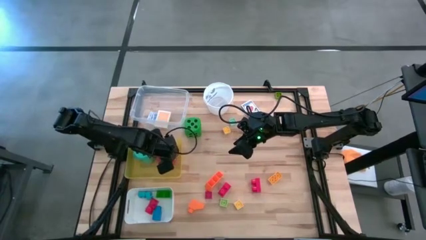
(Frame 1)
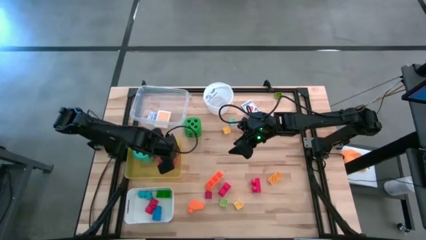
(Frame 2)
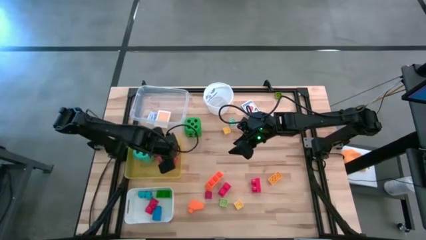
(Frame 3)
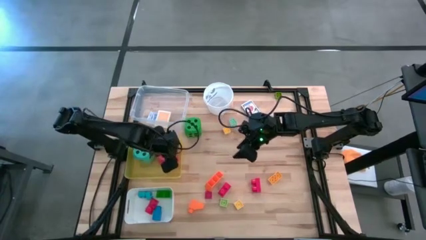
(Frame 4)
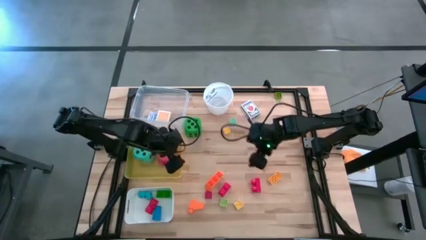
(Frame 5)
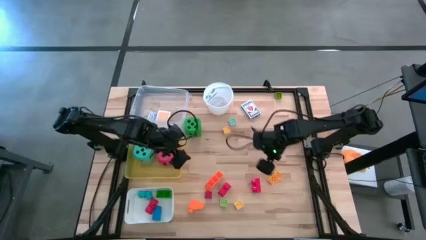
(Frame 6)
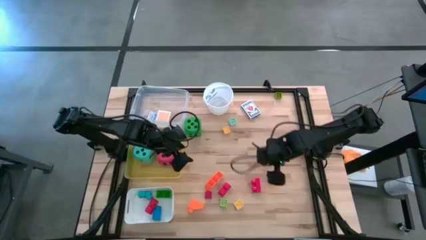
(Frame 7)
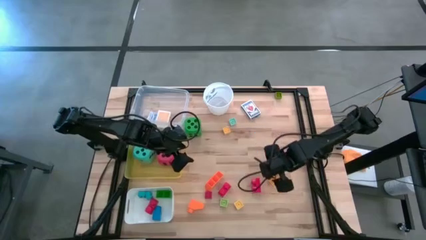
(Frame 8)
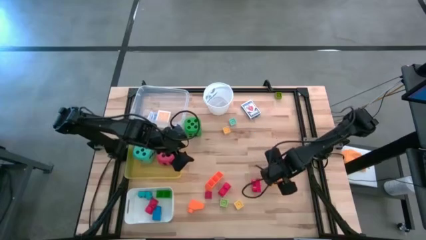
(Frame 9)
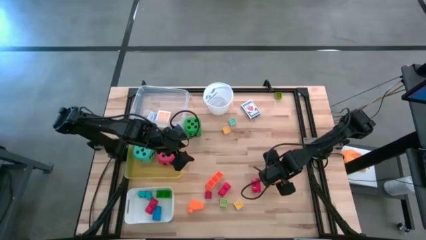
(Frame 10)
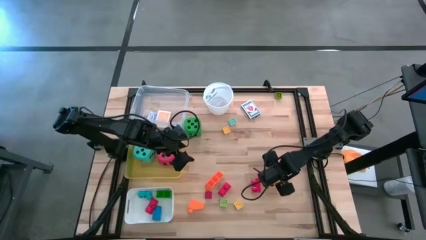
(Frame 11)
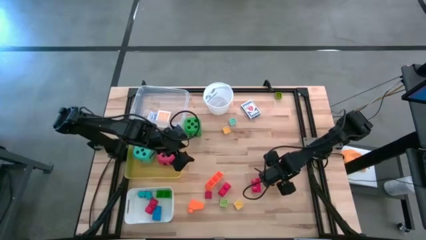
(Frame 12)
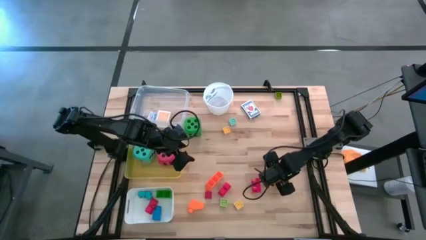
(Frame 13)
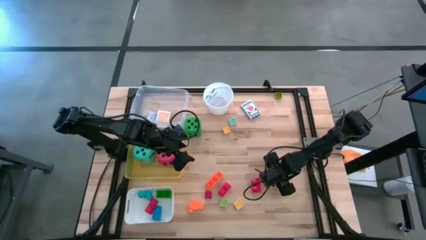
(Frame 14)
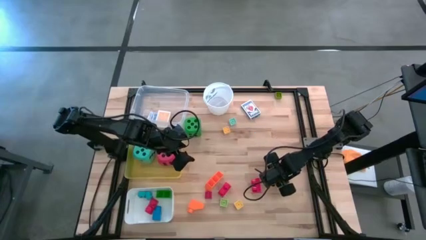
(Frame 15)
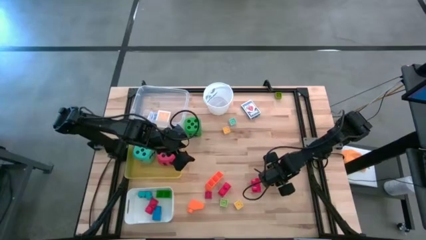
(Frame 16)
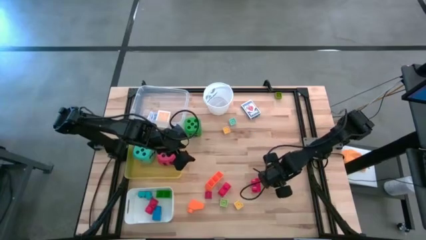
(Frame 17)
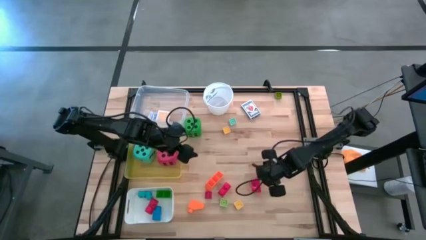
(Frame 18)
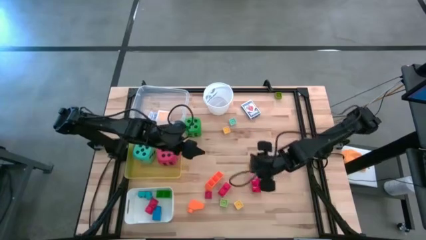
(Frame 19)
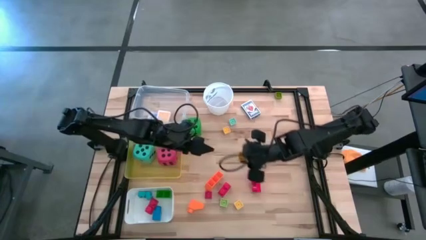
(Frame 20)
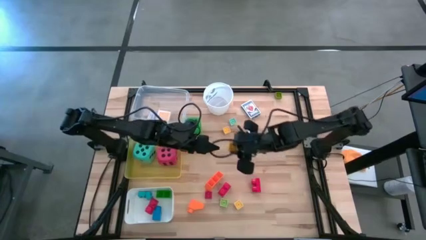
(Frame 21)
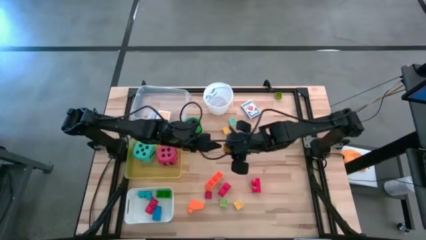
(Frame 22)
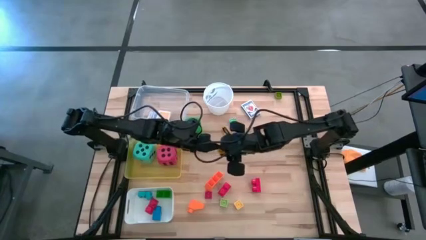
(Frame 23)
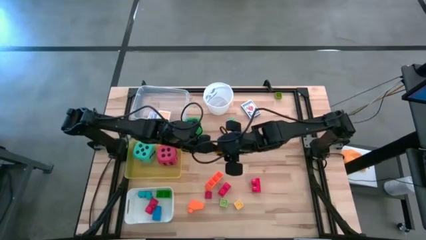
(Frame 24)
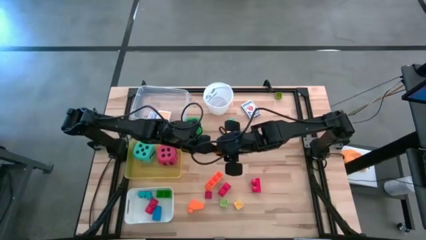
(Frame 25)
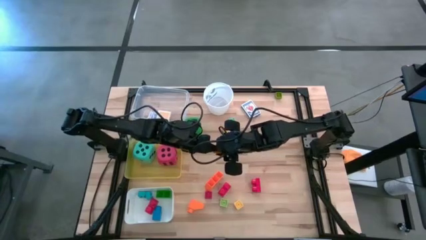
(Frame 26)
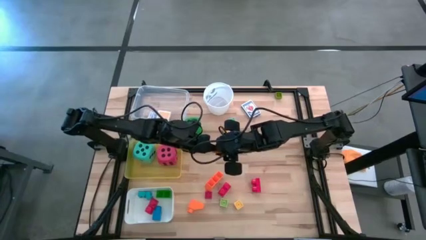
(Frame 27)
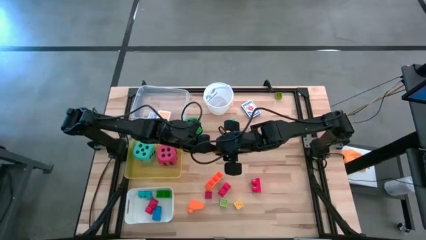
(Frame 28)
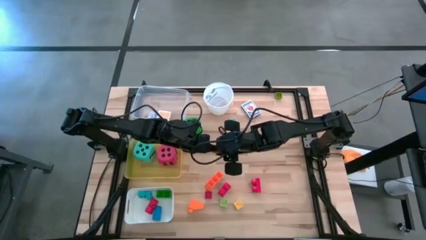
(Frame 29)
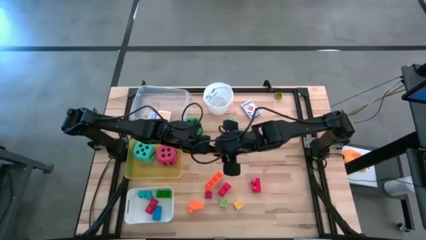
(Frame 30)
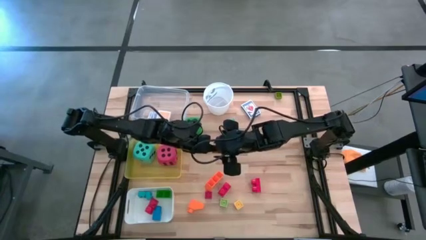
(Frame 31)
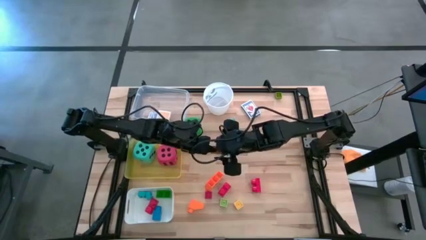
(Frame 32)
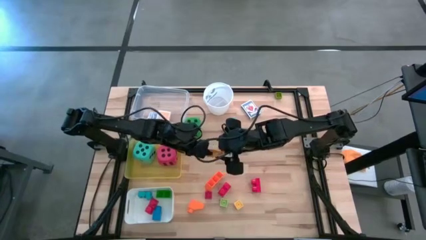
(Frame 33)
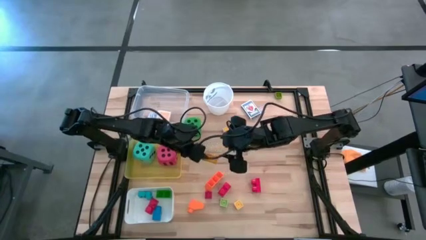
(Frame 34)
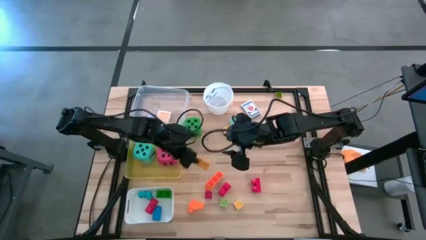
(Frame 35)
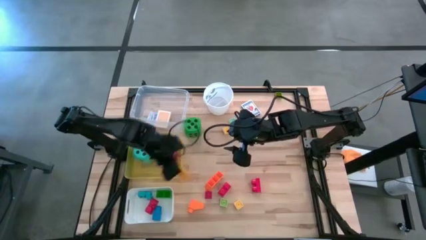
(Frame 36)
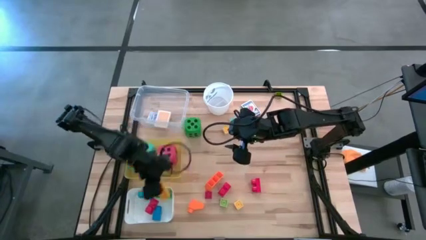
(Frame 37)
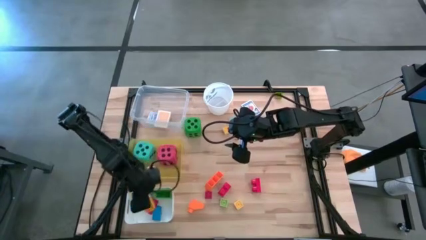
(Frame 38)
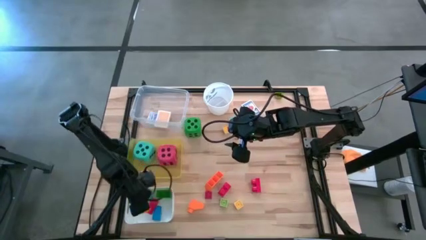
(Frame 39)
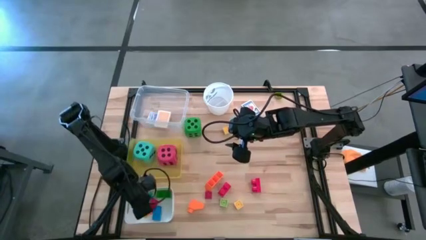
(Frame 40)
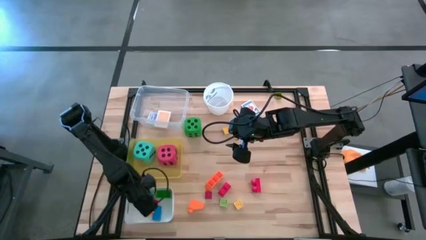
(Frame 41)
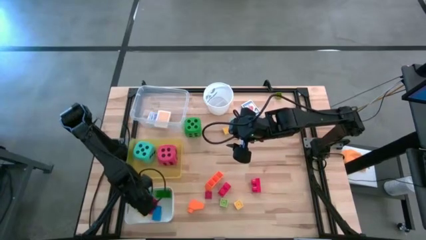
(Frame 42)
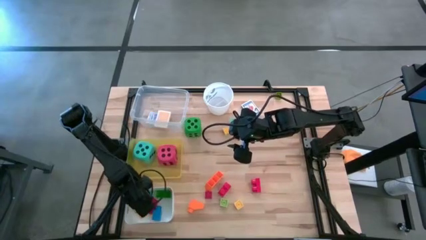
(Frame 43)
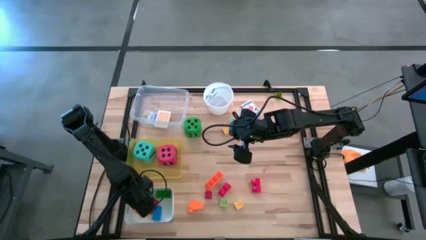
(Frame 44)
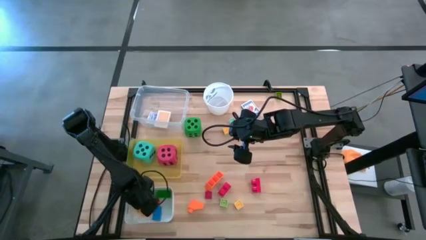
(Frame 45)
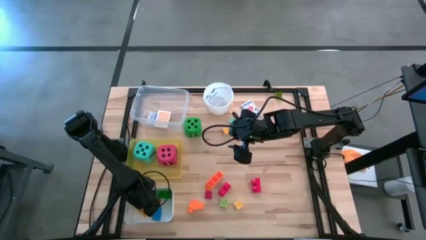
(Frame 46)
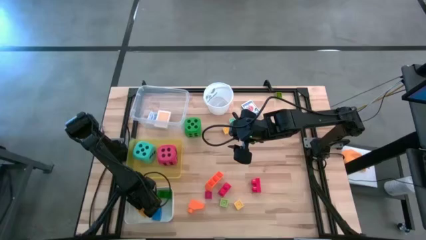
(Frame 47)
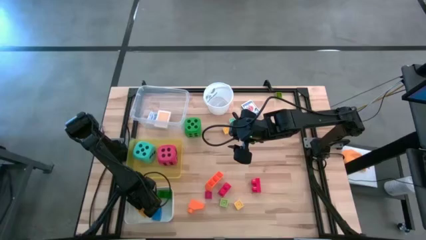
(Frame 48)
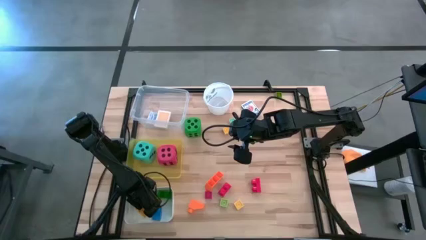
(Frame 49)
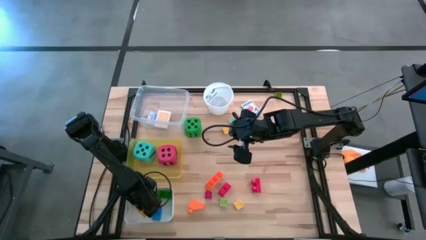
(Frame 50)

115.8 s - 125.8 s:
Task: Pick & Place Toys
Put the light orange game piece into the white bin

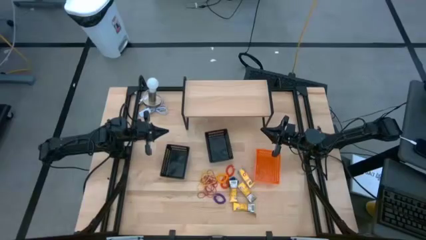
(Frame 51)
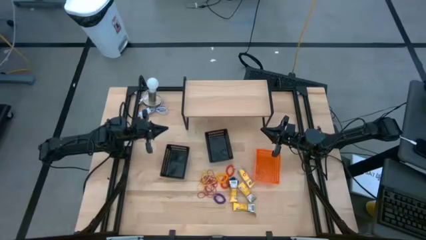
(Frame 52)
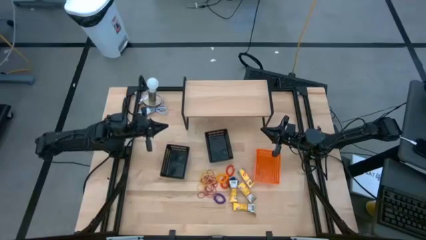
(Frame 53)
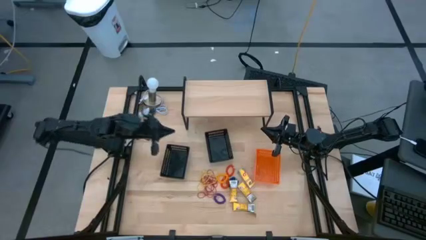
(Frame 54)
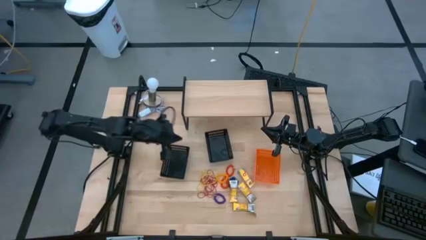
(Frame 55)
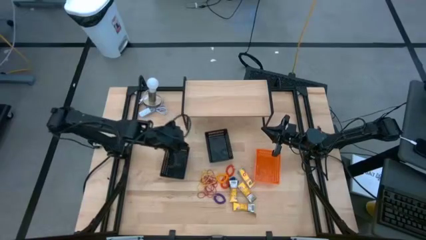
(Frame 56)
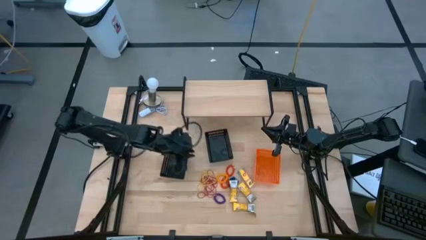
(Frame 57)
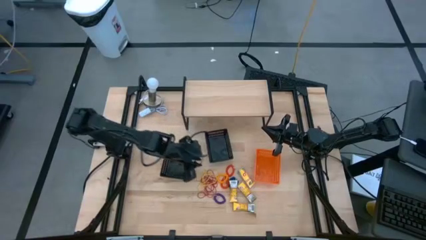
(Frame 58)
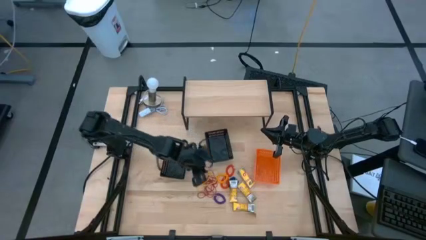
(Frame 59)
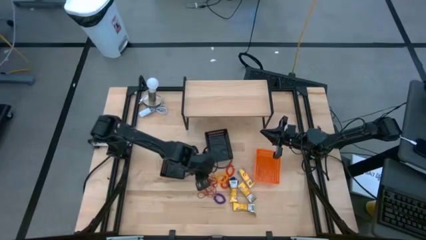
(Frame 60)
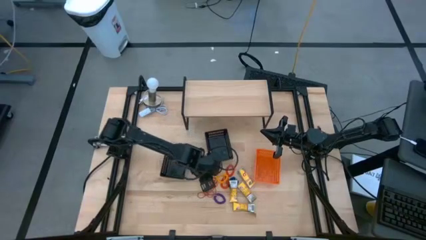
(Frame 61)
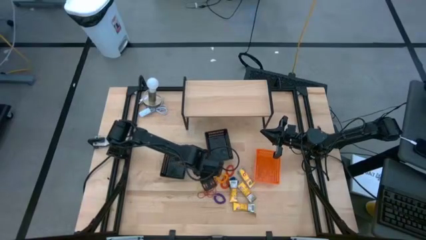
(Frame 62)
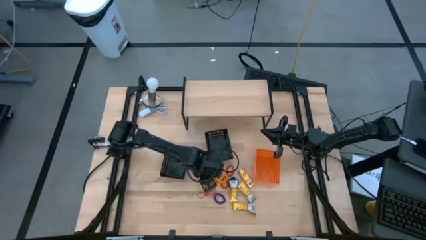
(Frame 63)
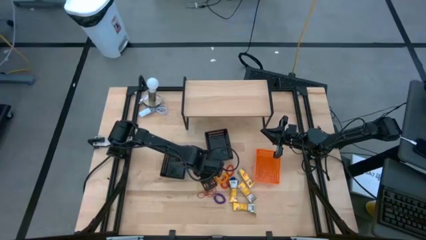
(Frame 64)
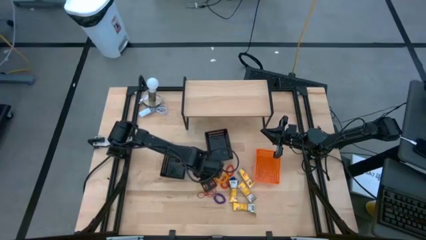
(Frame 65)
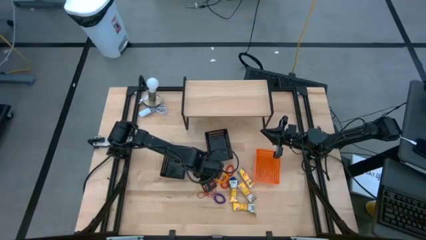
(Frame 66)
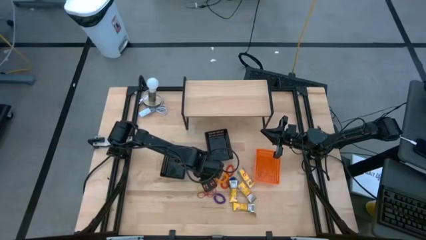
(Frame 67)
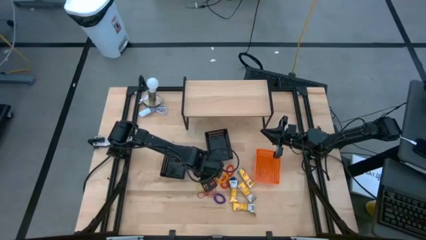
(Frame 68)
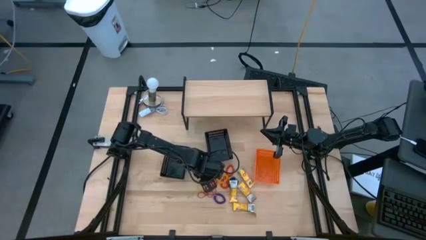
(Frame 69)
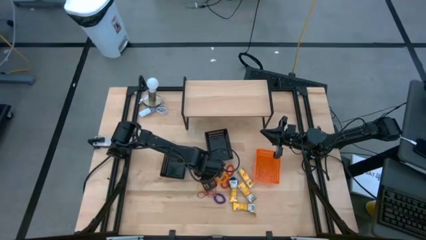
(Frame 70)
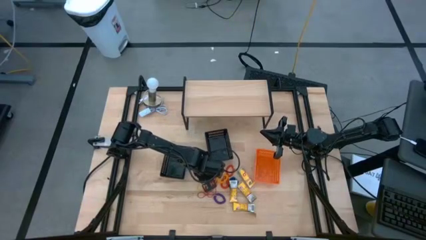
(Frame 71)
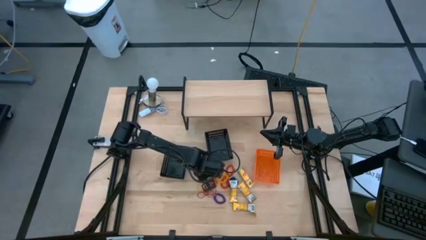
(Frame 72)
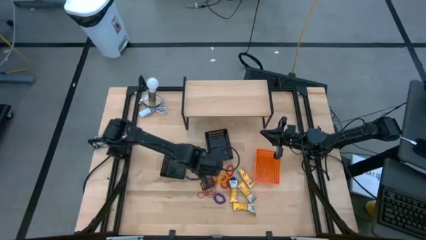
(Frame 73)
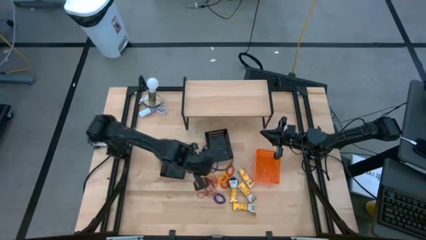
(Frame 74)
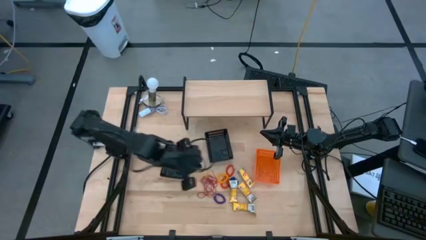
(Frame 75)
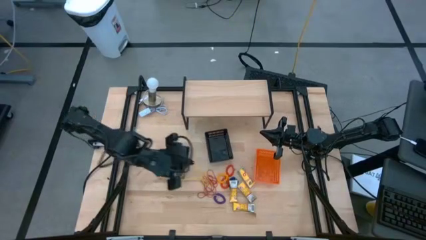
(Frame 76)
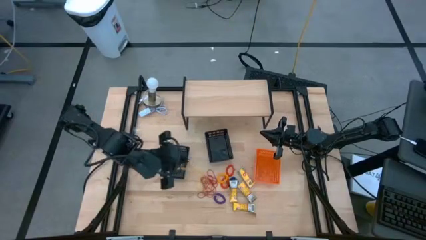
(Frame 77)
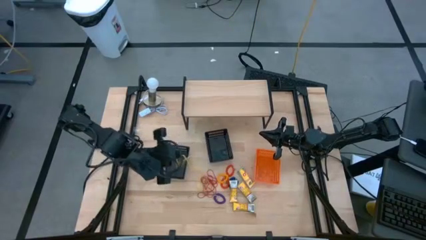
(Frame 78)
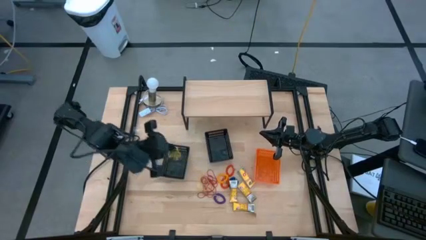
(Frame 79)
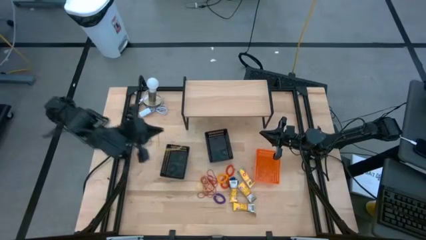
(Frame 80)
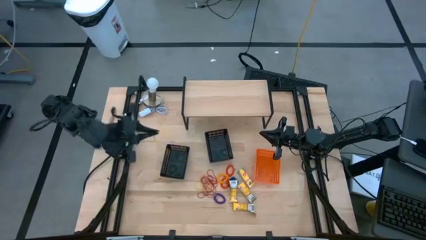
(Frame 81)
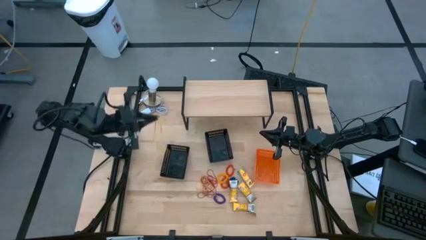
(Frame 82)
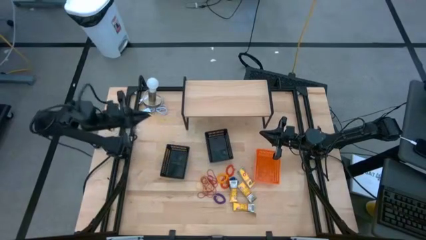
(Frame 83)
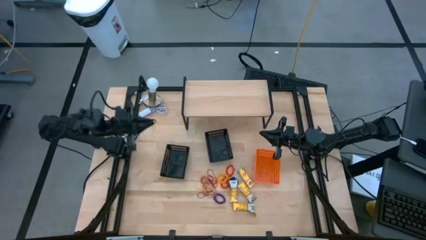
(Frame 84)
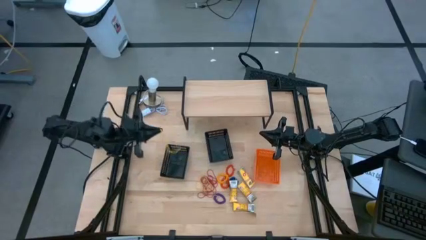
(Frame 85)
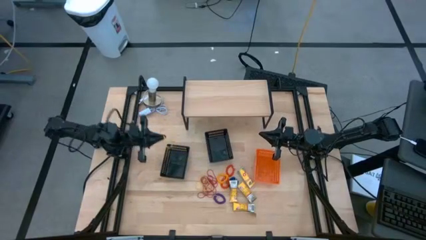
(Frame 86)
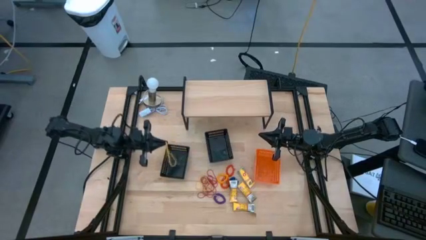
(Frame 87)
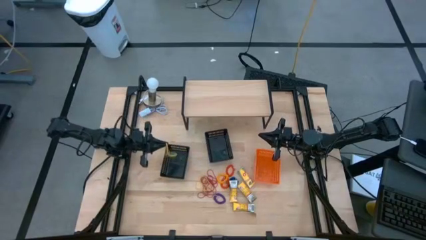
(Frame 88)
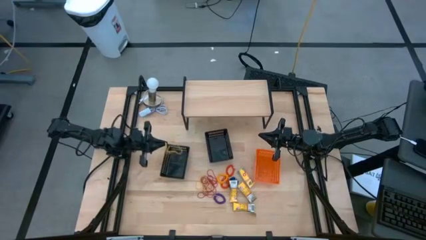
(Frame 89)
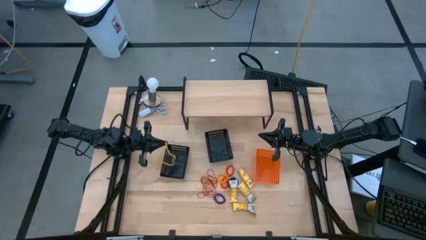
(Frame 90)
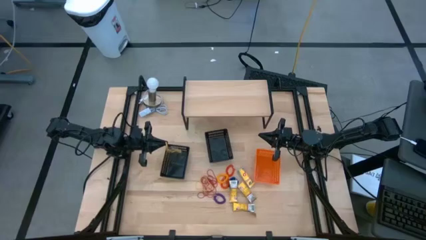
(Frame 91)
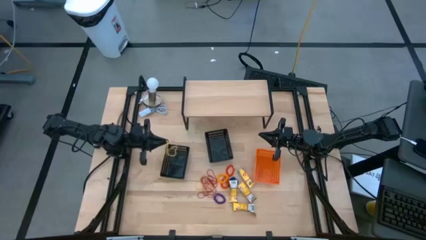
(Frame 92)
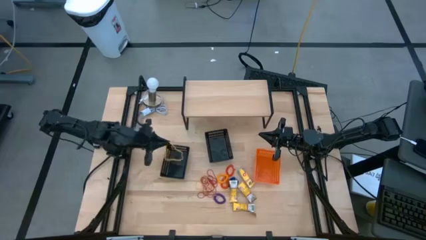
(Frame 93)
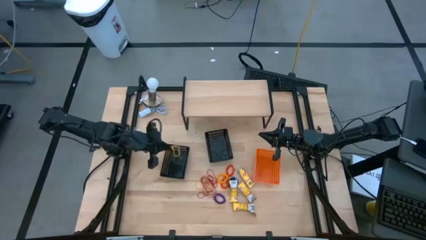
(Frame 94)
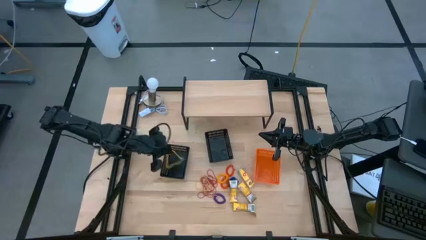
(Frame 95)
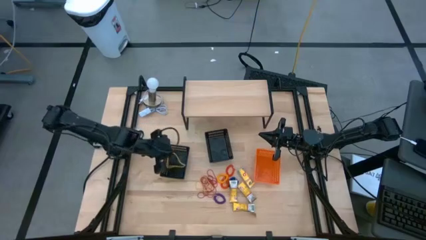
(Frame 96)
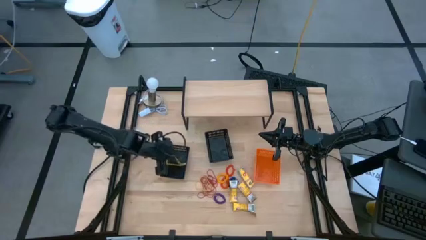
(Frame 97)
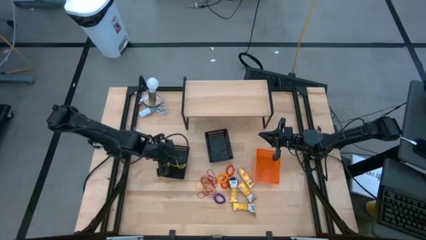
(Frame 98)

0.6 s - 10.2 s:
Task: Pick & Place Office Desk Supplies
Put the yellow rubber band into the left black bin
